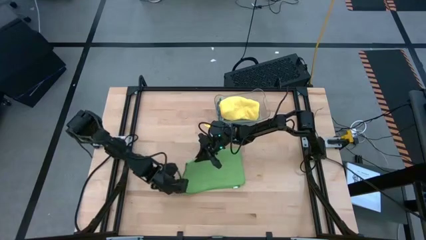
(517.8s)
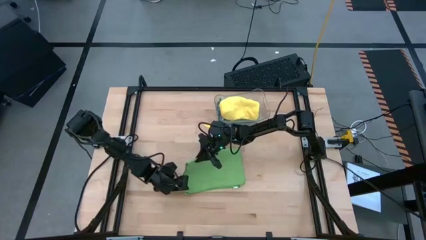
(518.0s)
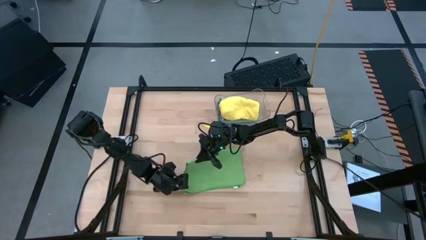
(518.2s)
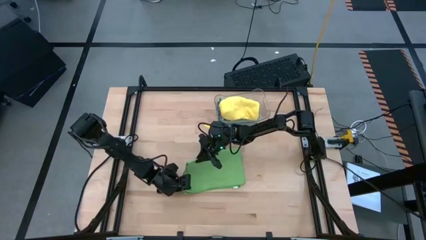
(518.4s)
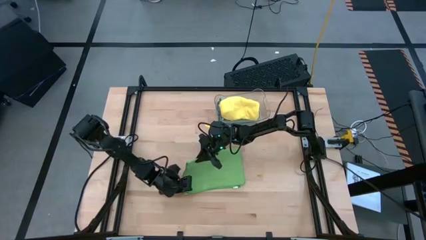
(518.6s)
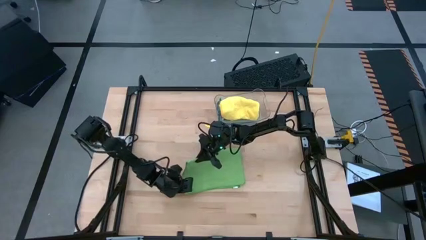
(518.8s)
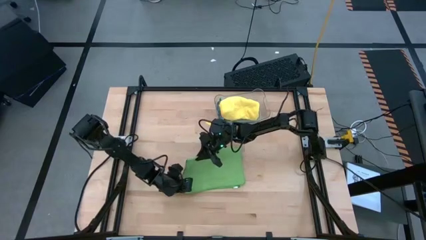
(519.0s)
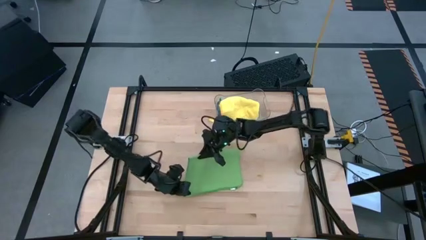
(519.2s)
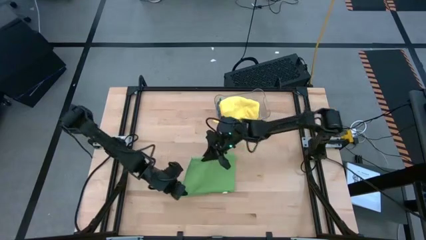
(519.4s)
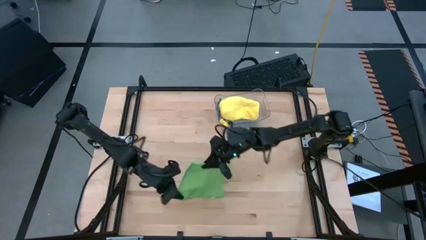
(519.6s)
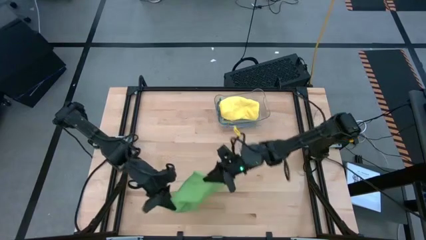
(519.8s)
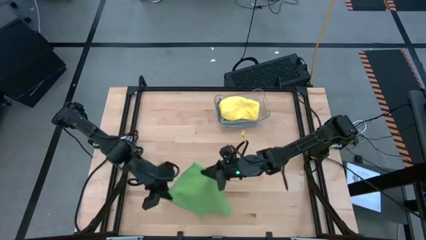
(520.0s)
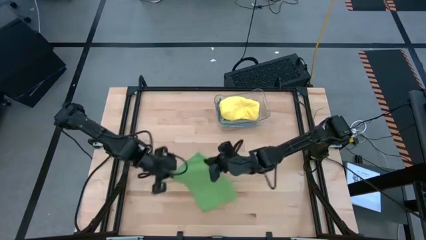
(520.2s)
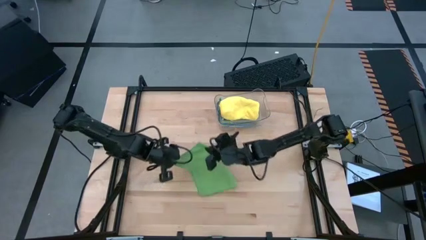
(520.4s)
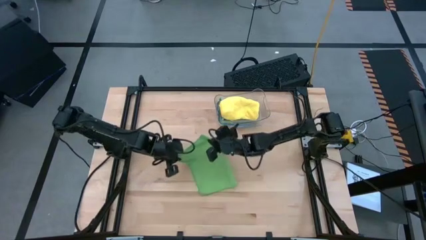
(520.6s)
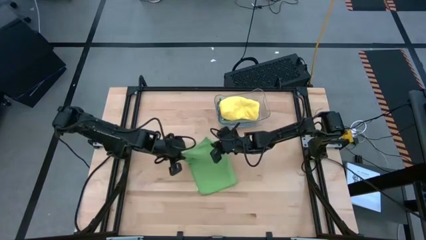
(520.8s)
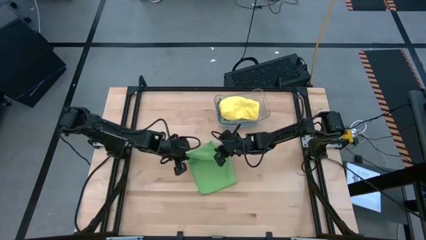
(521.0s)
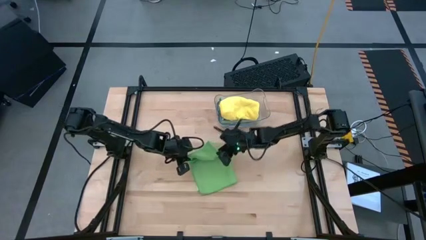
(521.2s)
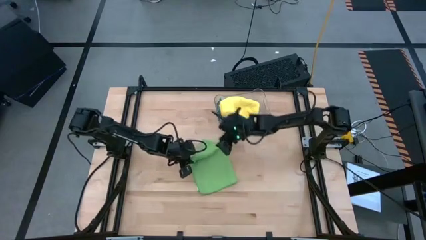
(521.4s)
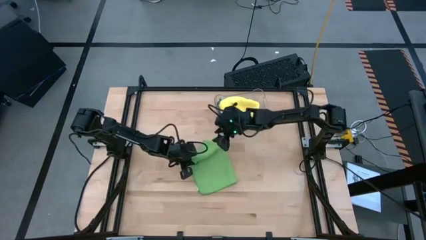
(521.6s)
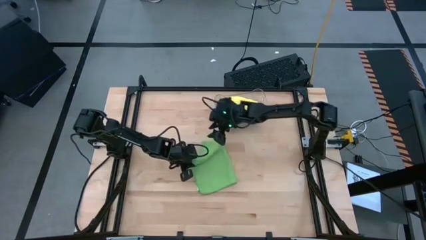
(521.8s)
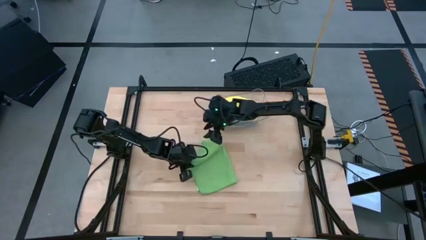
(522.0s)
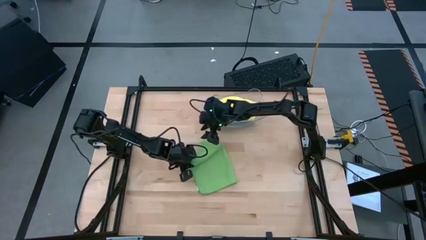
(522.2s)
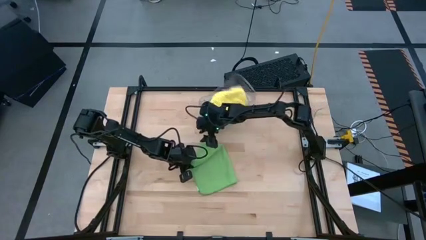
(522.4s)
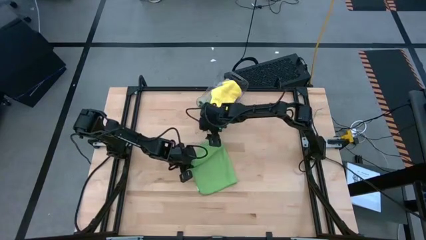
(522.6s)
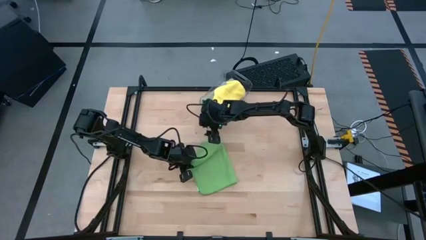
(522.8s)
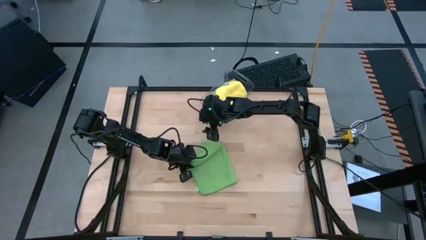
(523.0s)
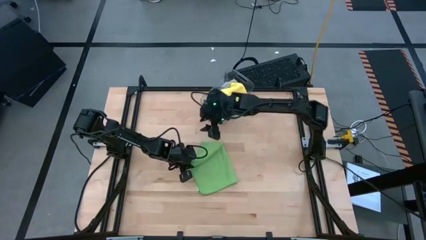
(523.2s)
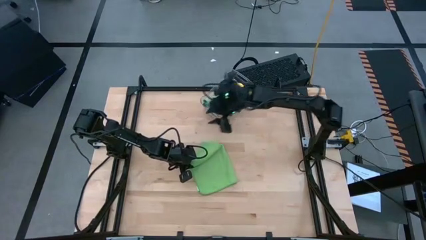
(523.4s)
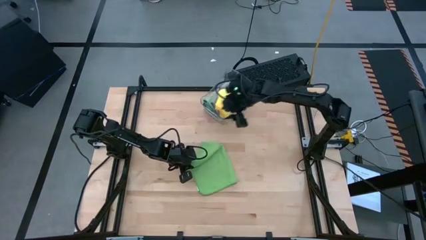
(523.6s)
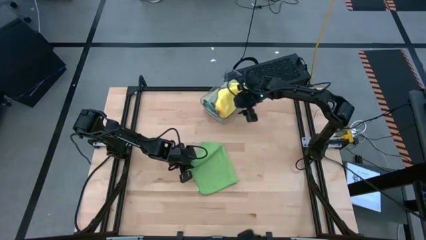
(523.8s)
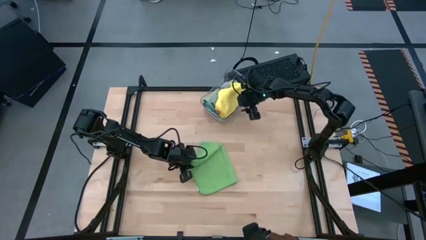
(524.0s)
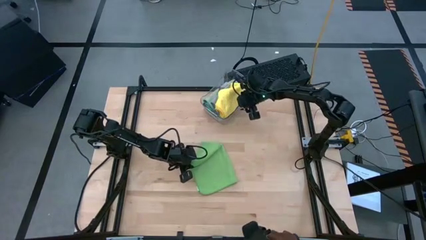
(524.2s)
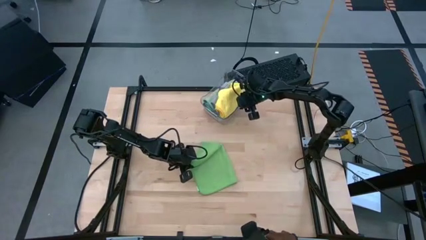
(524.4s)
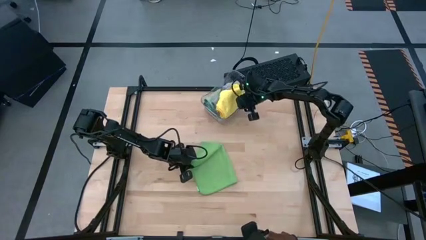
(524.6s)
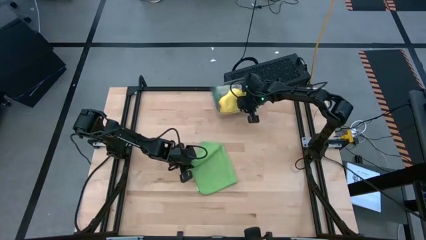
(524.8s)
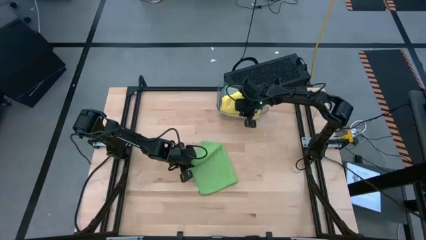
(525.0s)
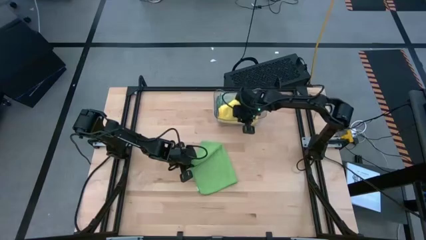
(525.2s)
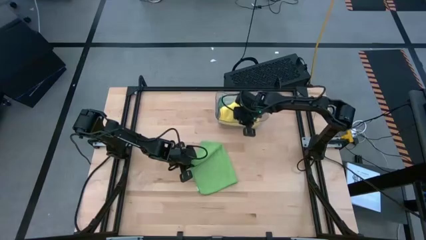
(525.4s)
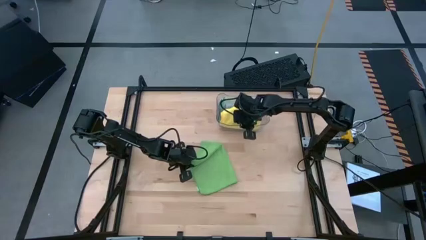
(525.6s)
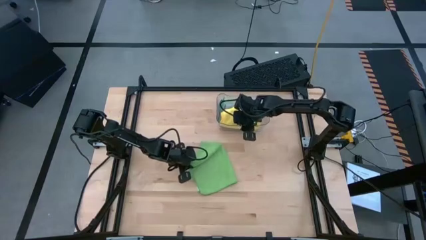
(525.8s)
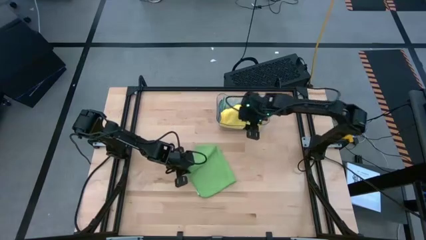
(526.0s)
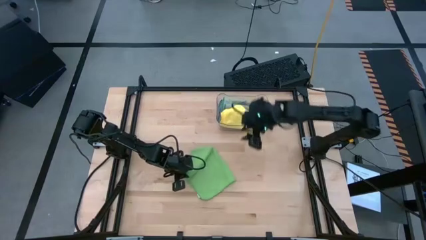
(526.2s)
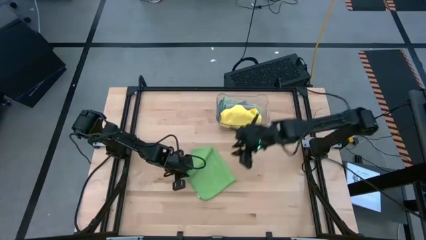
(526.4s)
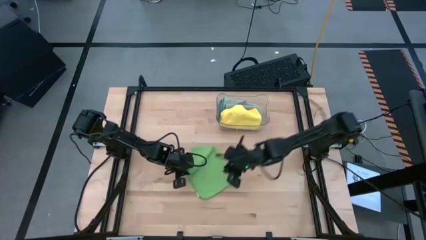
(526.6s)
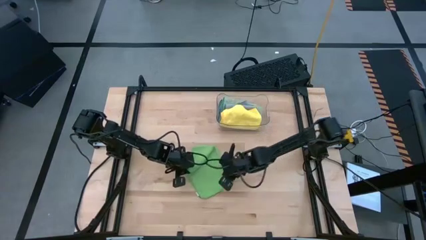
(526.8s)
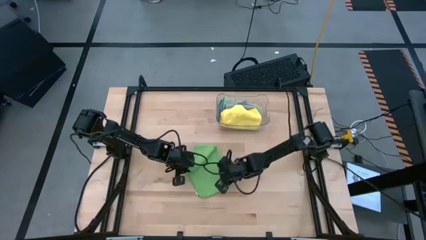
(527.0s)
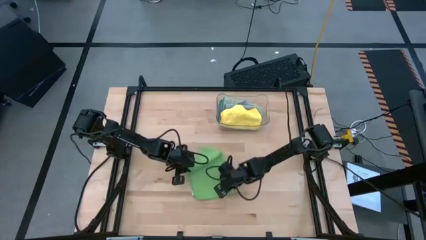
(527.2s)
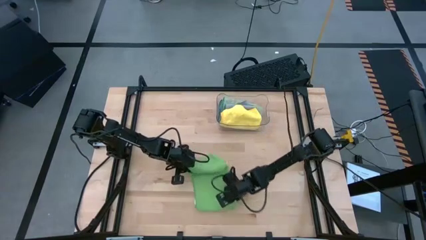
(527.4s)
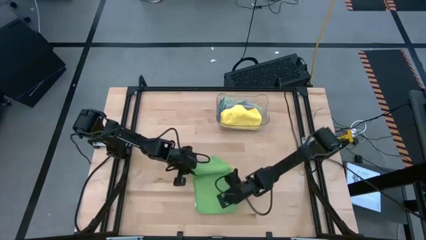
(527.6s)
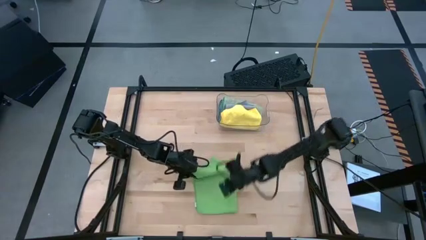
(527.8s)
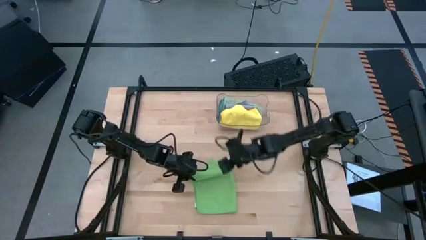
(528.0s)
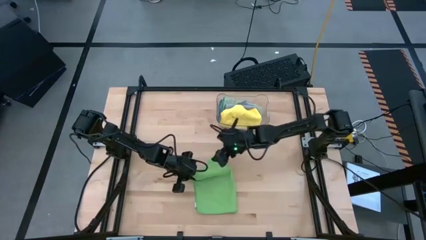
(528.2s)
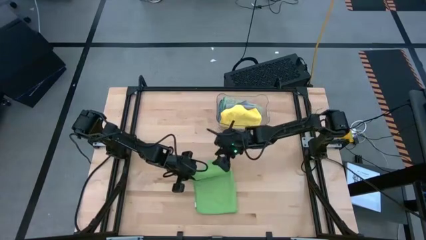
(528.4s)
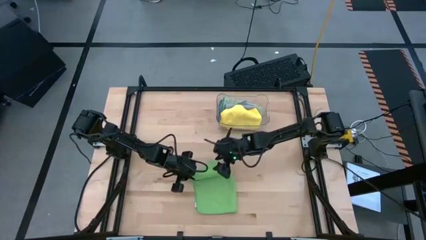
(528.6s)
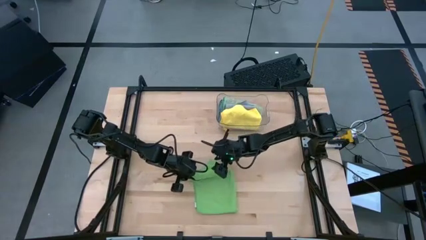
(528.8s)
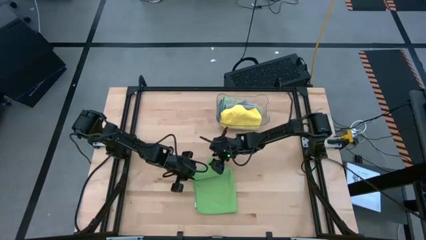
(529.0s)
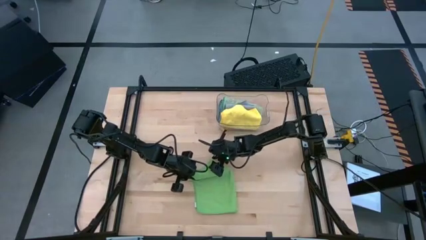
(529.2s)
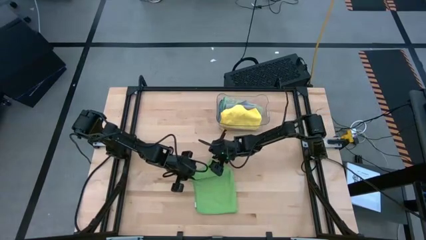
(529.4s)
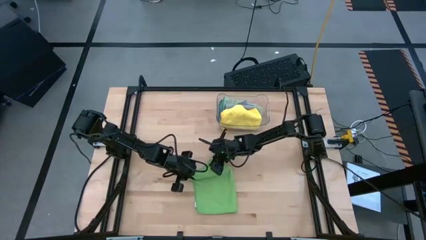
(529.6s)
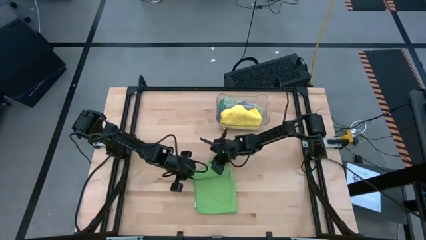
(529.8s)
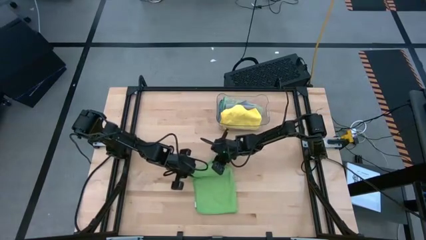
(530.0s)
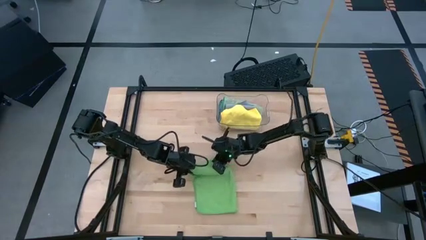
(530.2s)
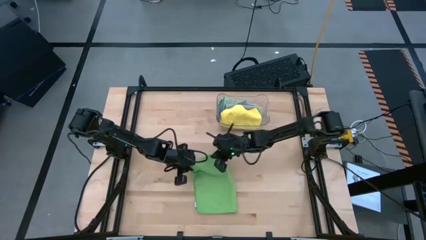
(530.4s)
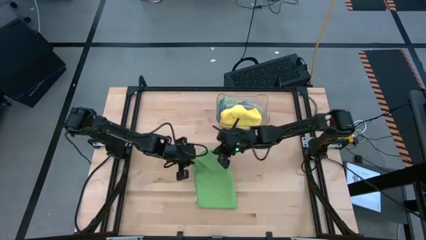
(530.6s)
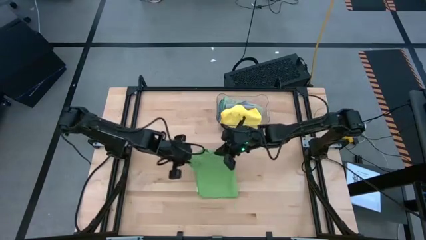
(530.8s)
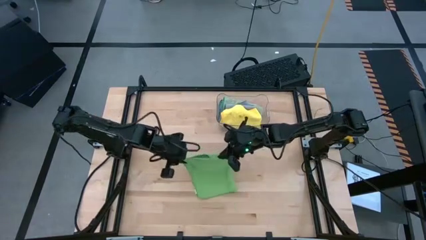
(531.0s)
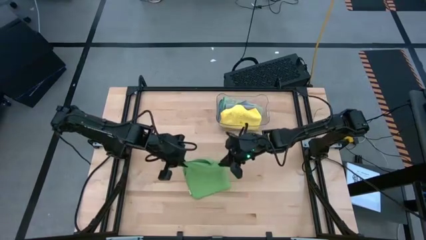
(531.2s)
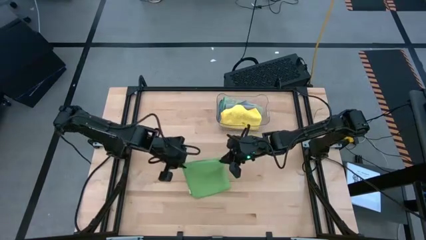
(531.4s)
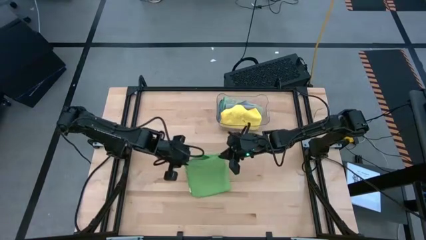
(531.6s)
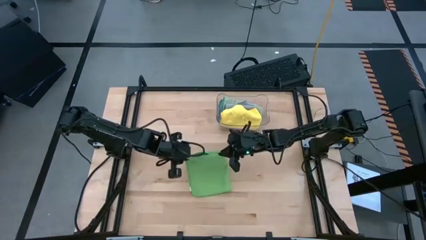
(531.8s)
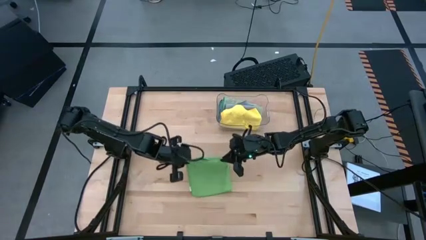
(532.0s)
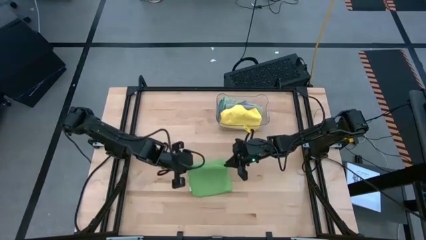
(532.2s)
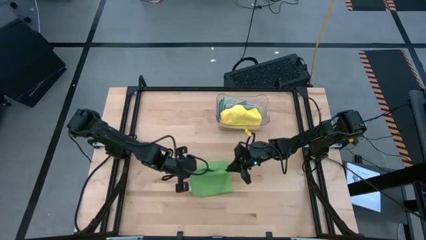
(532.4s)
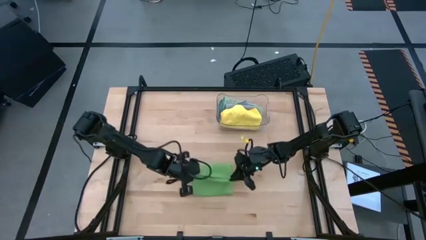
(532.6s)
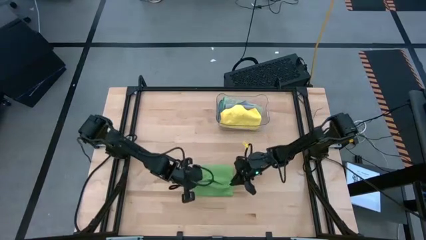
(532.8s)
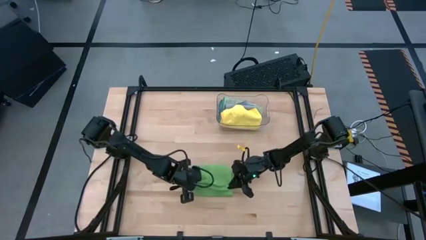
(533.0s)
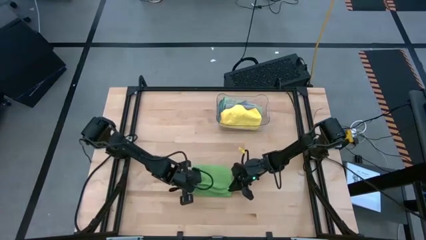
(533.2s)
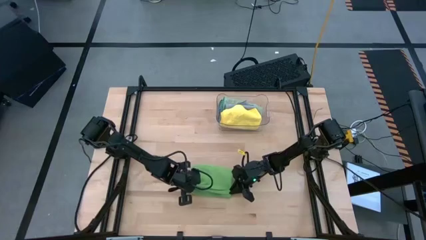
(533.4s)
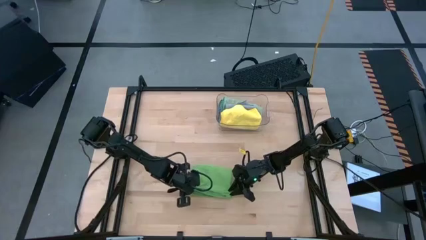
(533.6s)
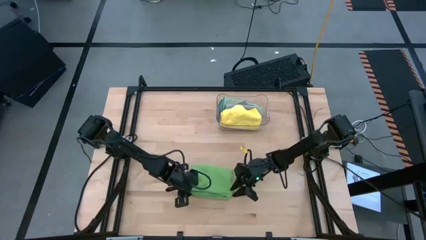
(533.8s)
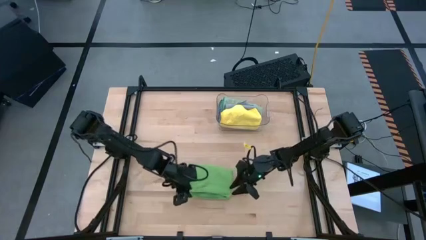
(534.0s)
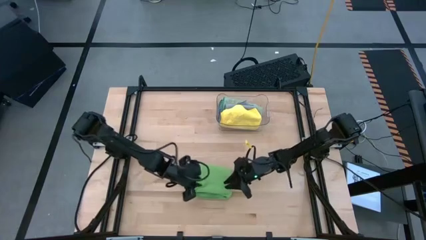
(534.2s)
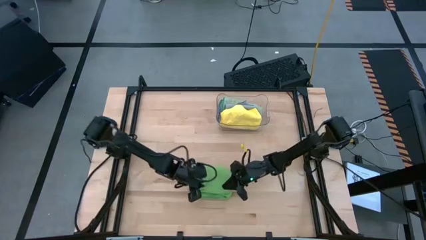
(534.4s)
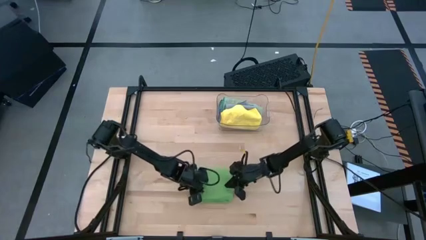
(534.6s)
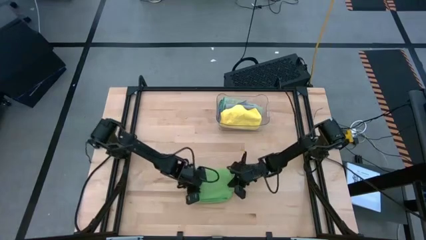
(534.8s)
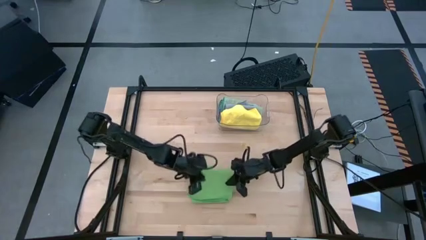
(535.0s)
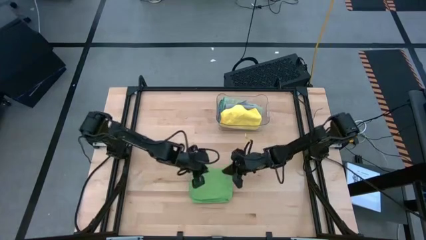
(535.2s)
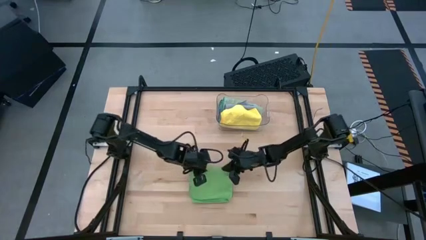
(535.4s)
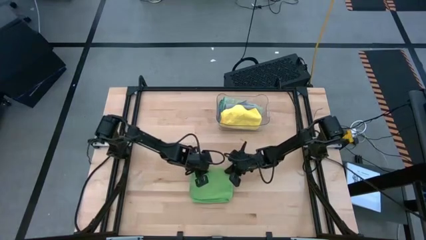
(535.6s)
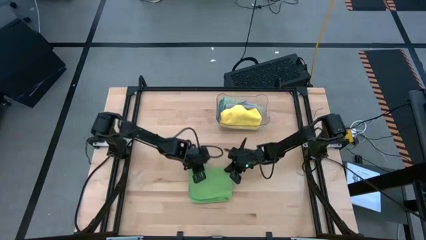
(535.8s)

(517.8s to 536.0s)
Task: Fold microfiber towels
Fold the green towel
